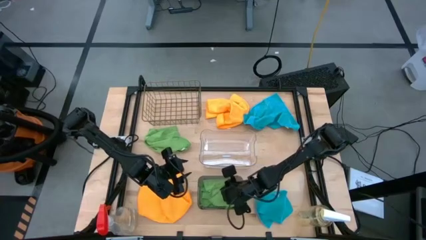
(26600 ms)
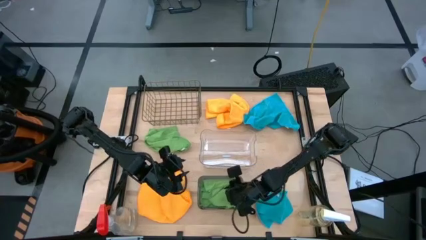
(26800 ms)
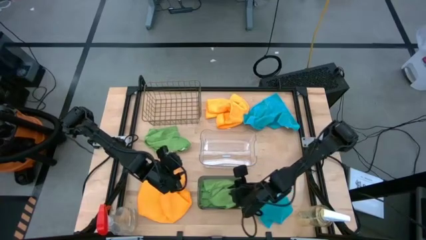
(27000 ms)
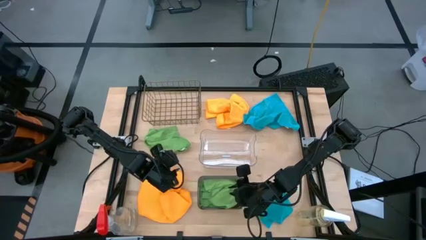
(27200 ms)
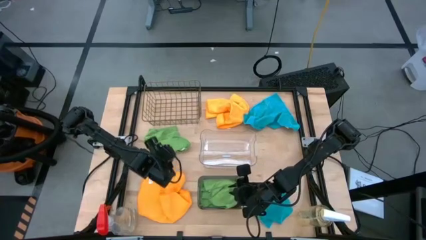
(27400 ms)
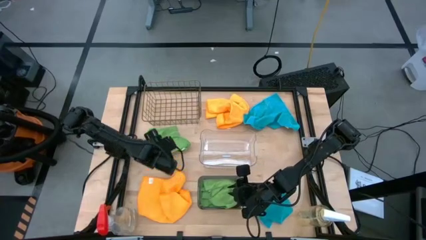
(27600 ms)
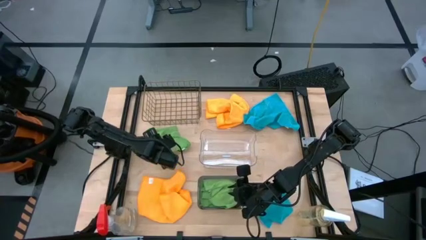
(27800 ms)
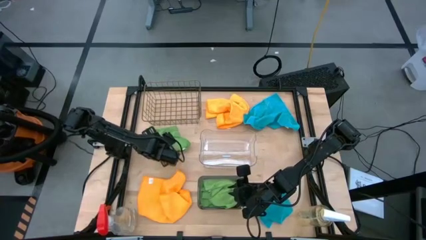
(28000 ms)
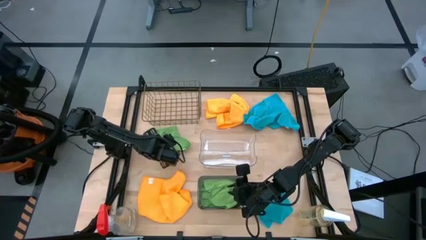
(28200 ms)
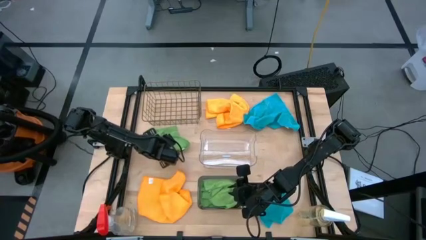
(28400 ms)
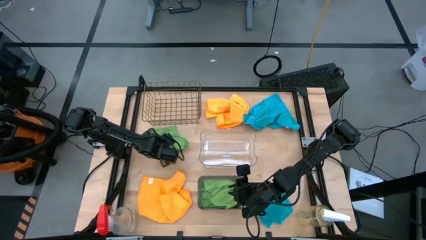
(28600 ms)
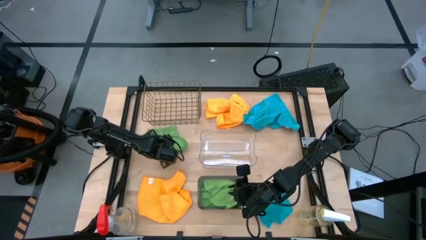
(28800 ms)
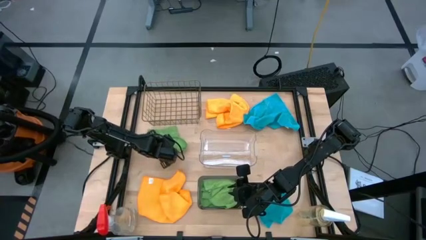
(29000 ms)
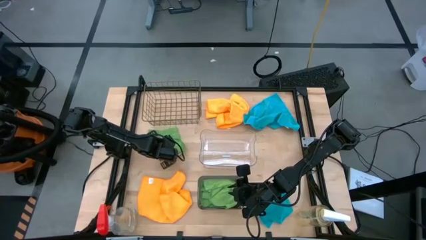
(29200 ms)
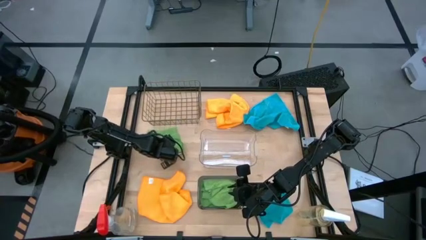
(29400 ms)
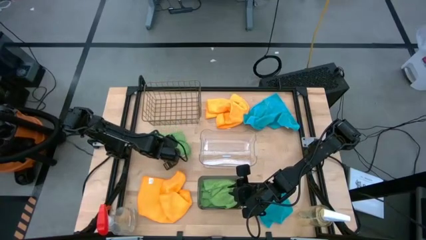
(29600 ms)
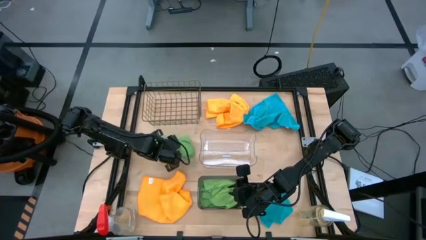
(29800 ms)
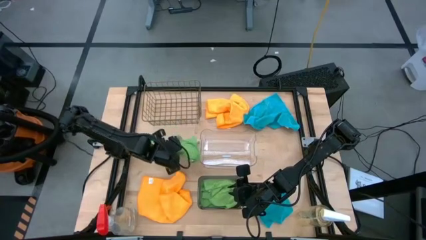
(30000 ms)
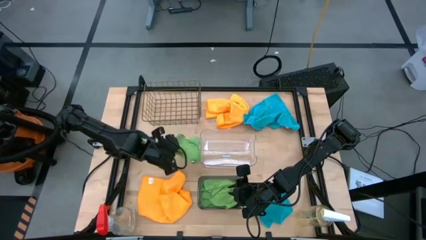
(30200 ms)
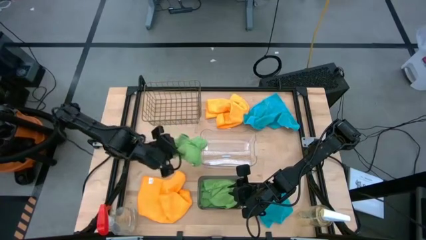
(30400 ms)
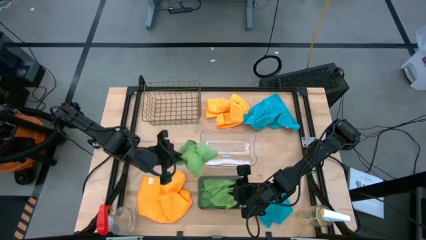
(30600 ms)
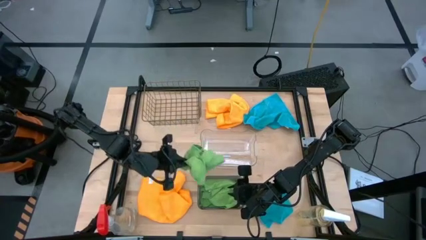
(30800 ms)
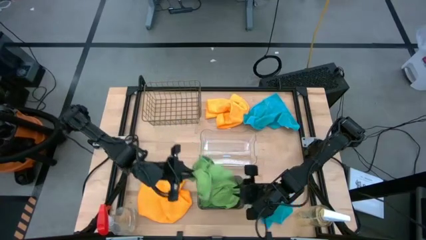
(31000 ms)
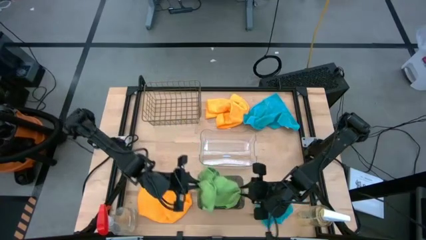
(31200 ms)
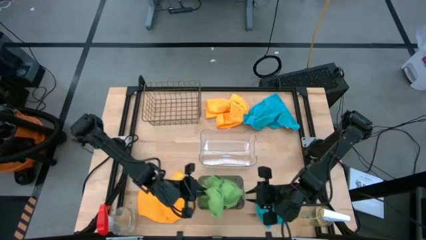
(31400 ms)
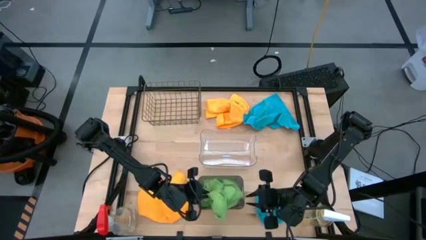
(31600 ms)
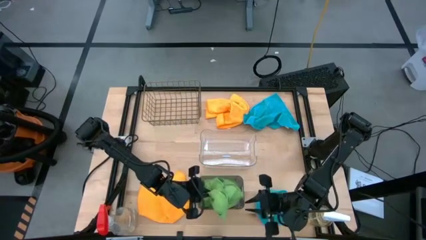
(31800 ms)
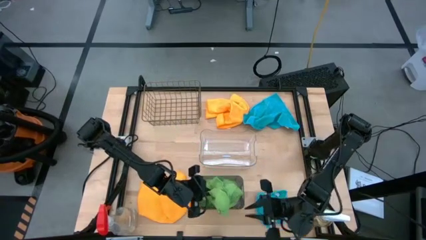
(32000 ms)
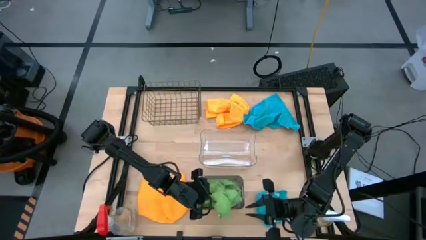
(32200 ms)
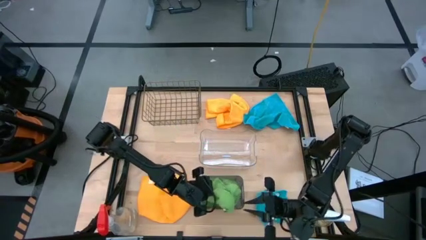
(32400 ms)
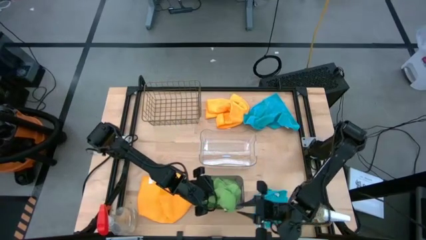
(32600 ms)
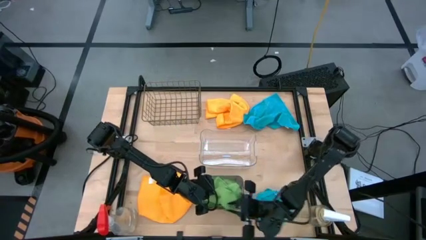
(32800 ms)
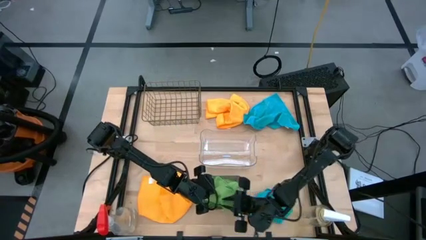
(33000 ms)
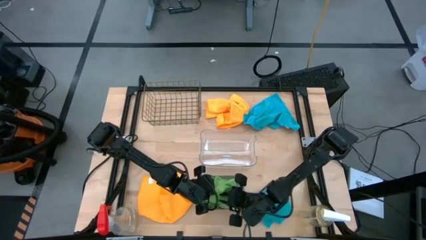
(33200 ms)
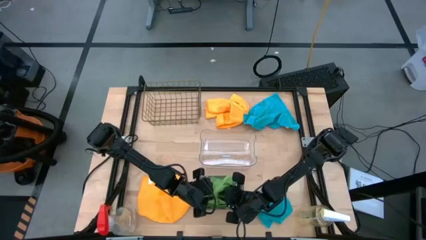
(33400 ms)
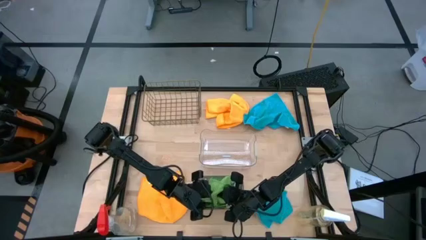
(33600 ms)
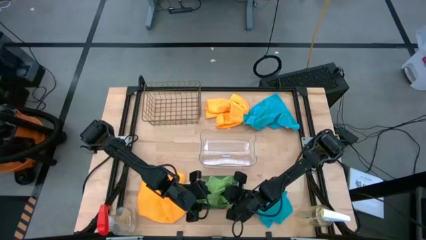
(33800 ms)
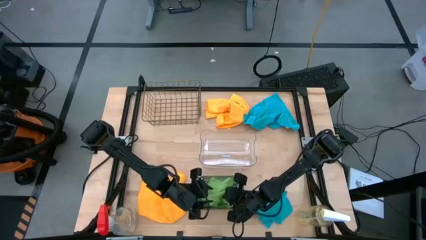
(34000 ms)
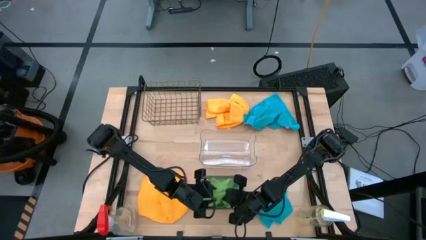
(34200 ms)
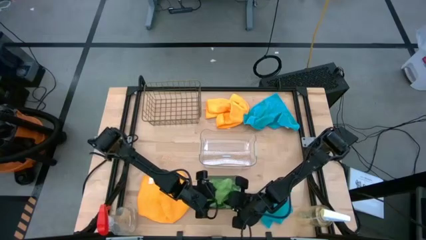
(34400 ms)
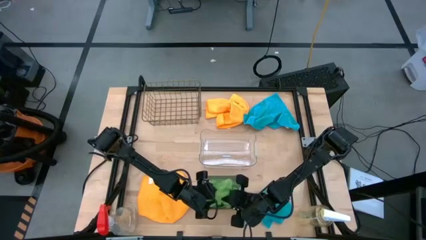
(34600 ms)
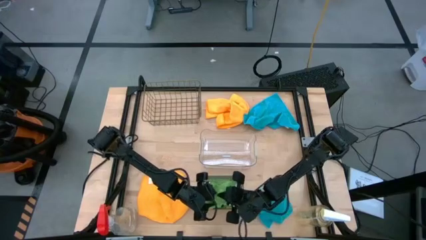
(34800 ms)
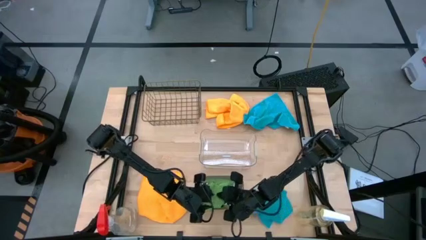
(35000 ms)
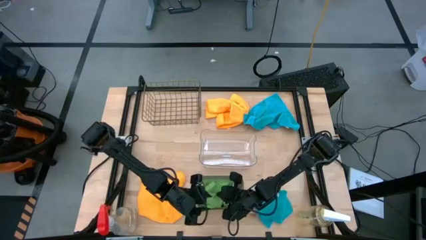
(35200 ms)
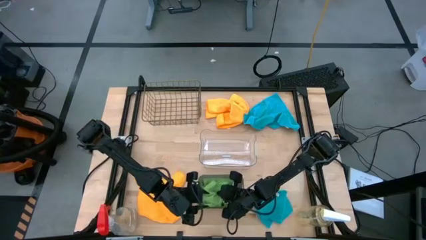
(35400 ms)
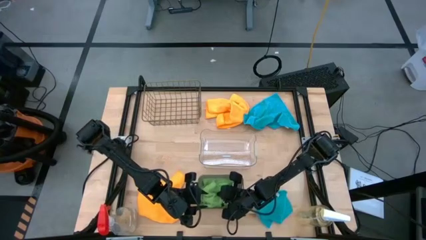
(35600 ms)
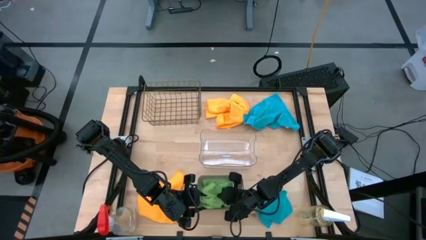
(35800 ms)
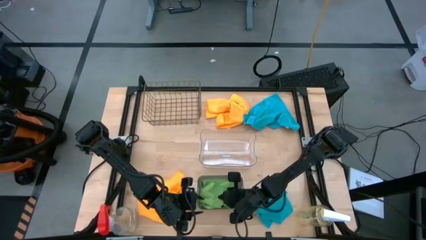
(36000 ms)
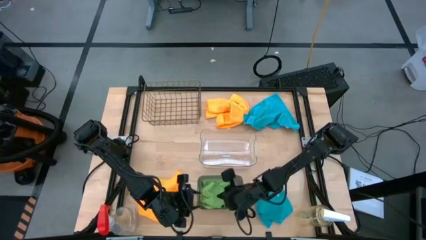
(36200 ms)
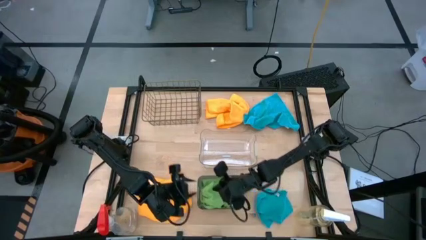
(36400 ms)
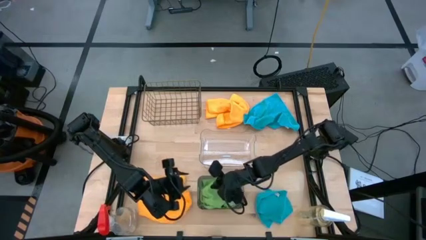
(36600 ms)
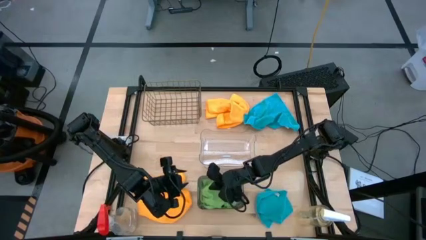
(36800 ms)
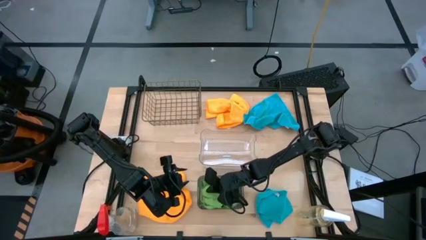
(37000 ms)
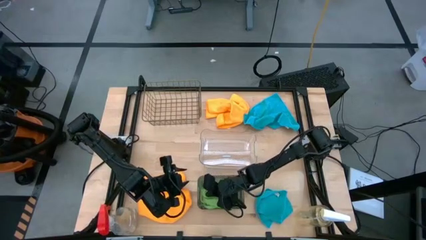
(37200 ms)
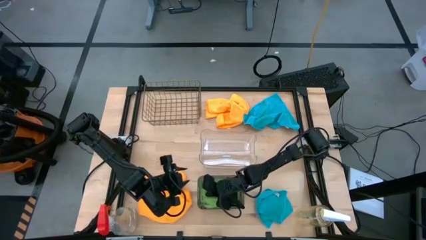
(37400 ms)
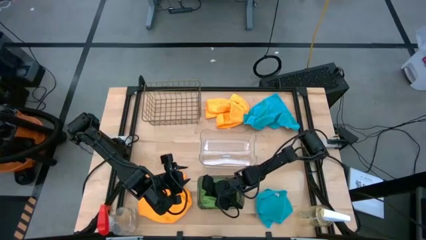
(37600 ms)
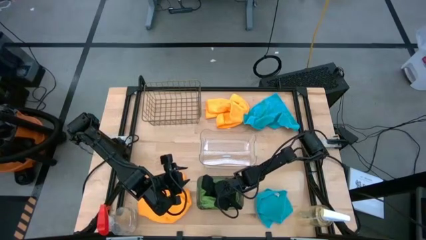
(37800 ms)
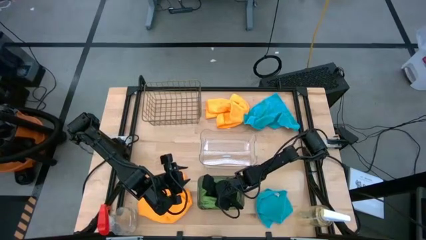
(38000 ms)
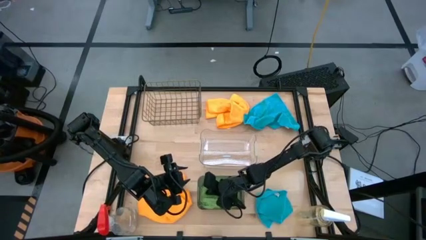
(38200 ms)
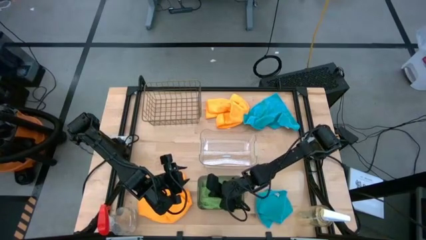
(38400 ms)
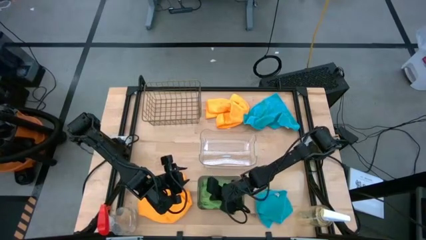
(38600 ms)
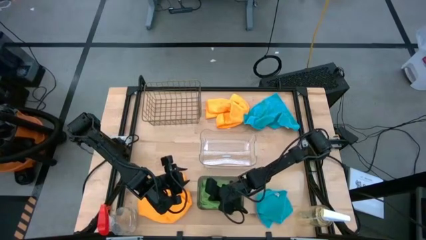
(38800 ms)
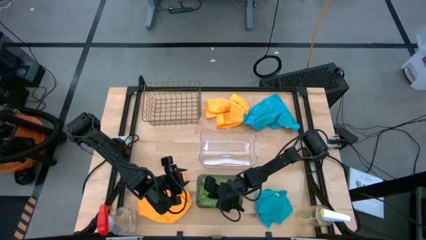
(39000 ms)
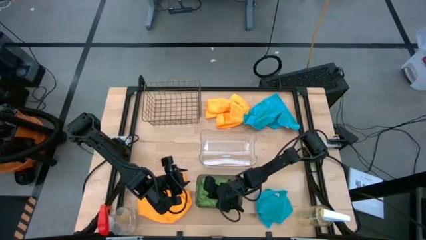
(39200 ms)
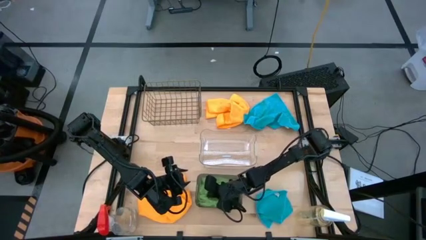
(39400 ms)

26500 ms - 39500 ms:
Task: Sort microfiber towel by color & place in baskets
Put the green towel into the black transparent bin

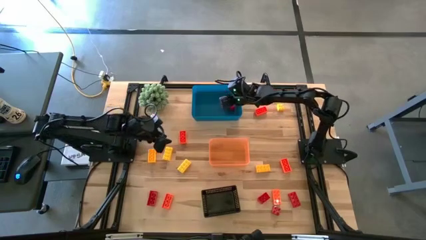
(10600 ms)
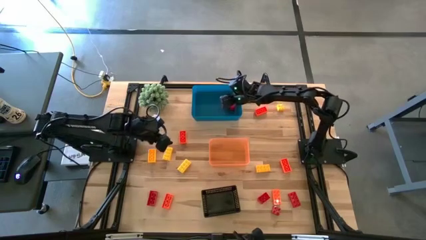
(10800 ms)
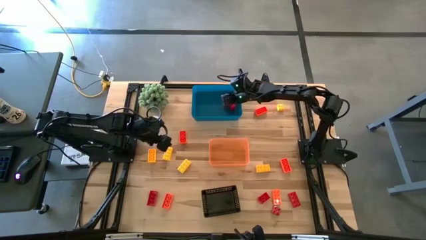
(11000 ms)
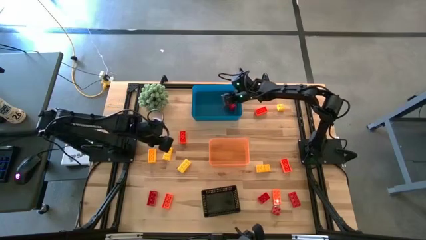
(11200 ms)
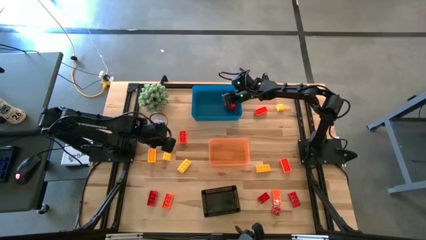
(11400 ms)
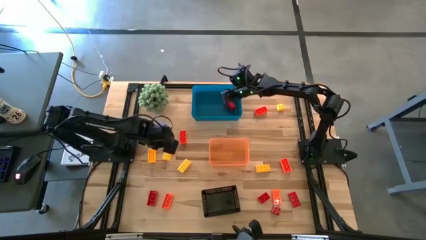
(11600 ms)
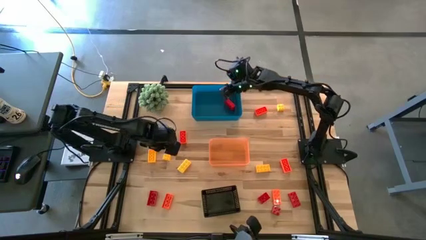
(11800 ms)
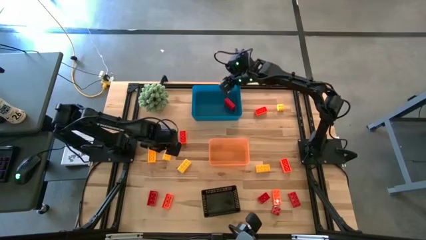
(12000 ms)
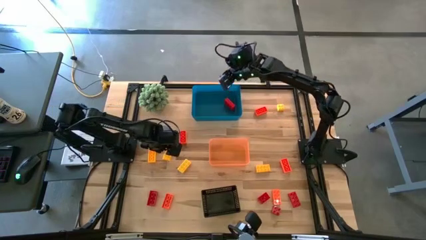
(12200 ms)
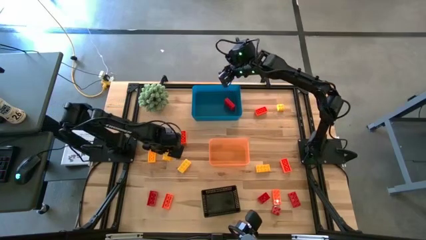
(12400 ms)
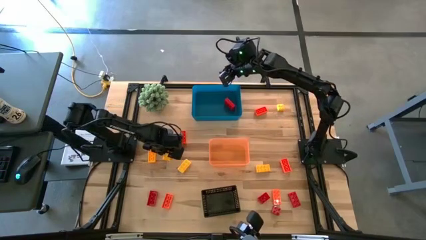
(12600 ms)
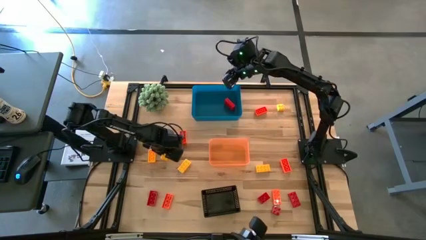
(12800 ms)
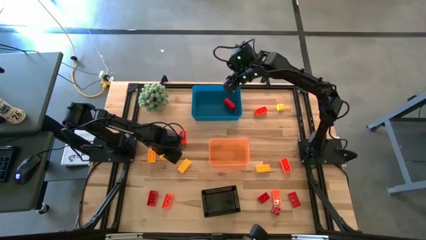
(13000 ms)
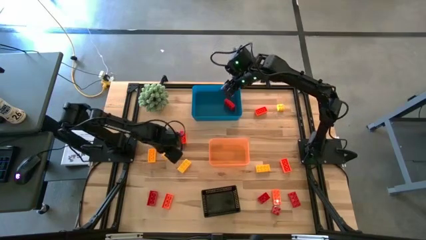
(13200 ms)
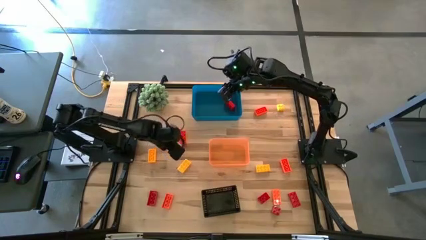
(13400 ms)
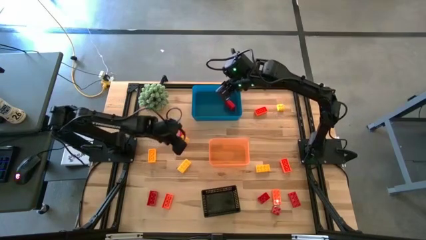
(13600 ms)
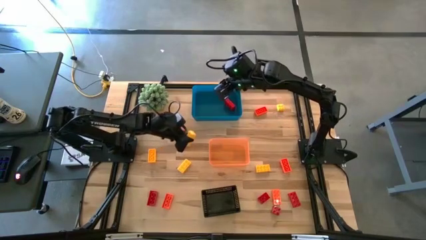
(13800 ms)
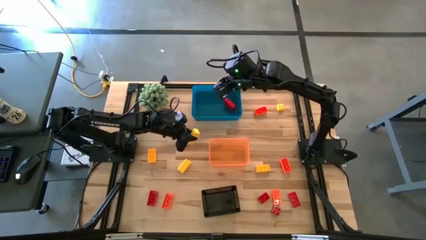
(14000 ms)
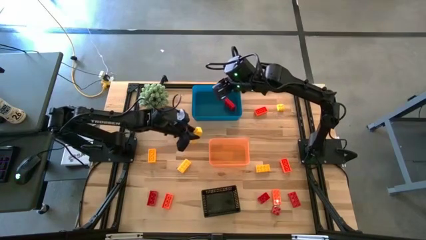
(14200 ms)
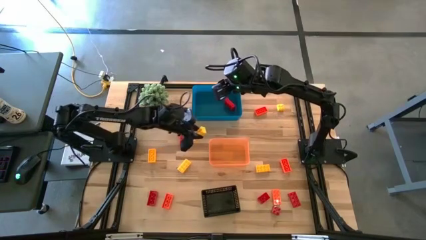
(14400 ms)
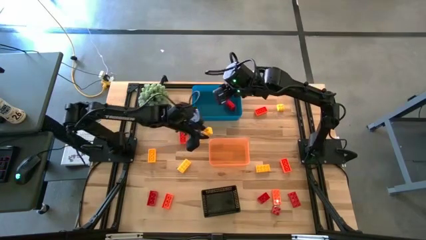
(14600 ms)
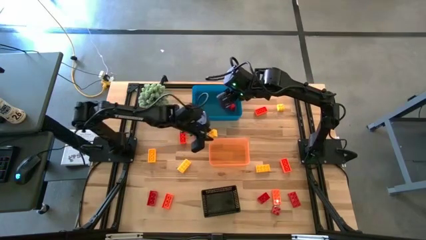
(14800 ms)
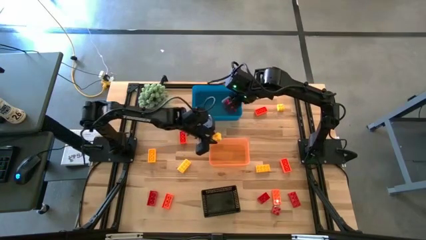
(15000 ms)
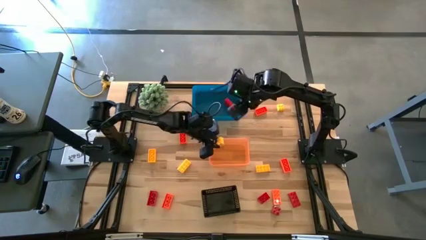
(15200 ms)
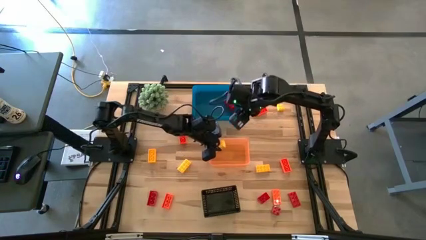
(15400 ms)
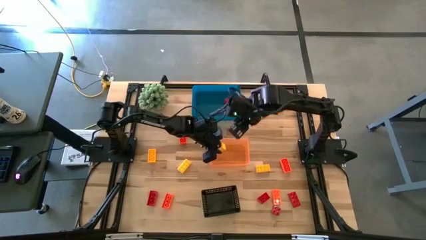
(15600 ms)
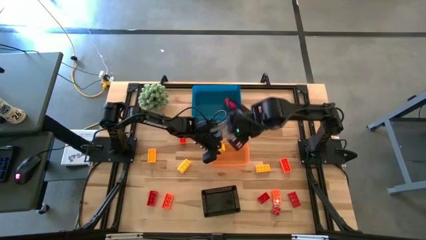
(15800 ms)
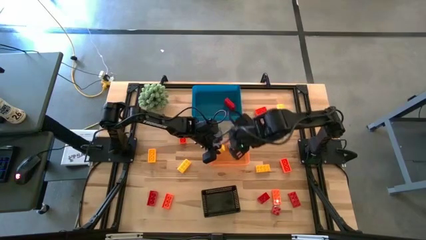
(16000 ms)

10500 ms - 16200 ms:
Task: Sort & place blocks by color
Put the yellow game piece into the orange bin
